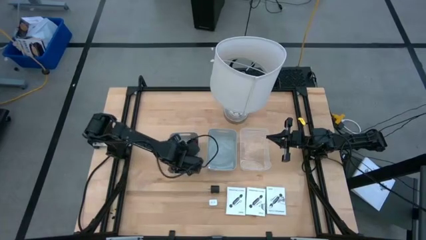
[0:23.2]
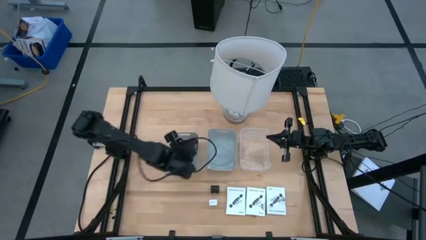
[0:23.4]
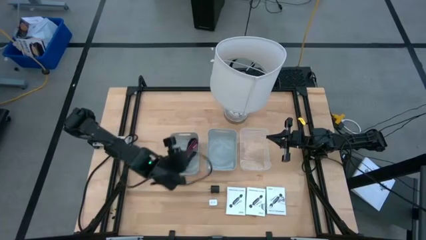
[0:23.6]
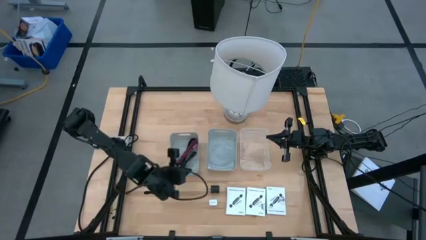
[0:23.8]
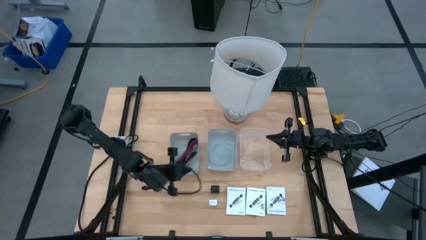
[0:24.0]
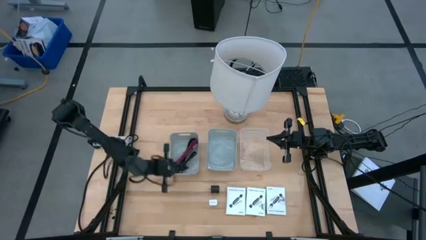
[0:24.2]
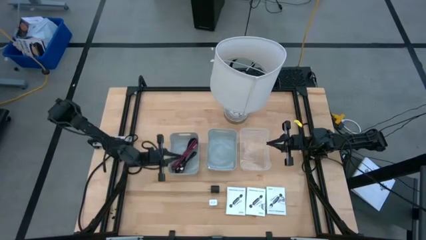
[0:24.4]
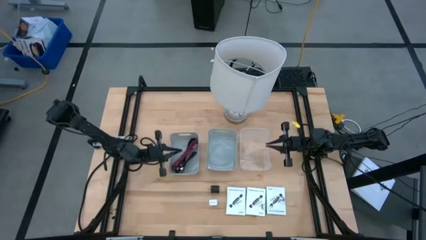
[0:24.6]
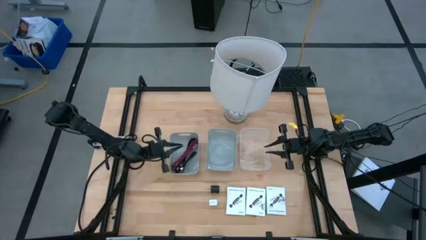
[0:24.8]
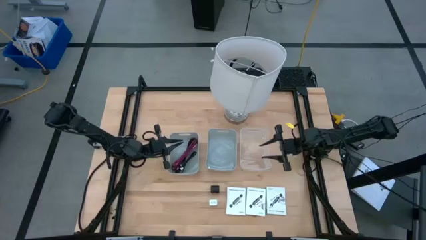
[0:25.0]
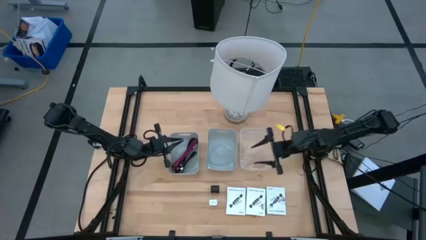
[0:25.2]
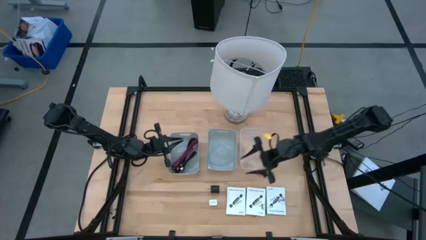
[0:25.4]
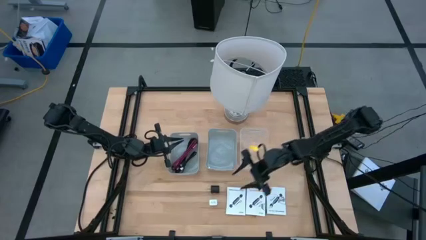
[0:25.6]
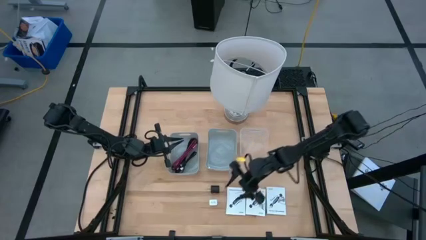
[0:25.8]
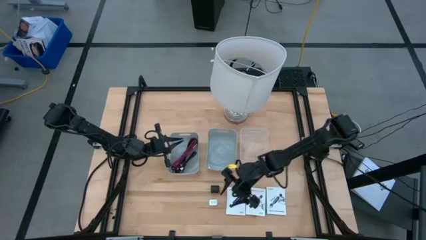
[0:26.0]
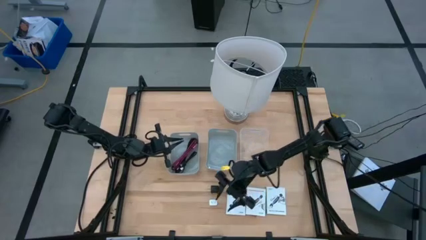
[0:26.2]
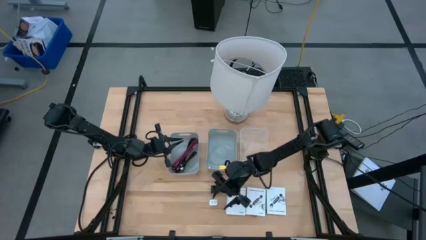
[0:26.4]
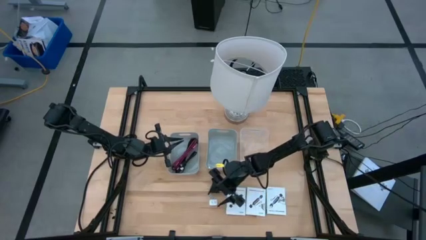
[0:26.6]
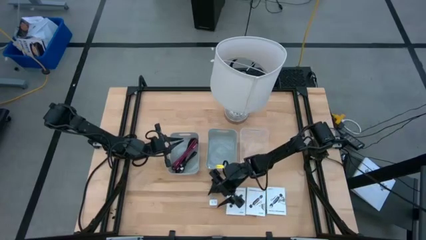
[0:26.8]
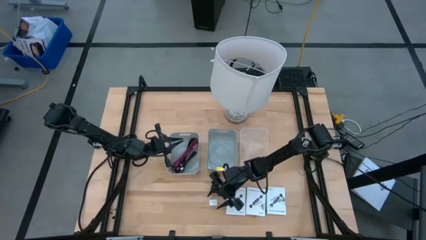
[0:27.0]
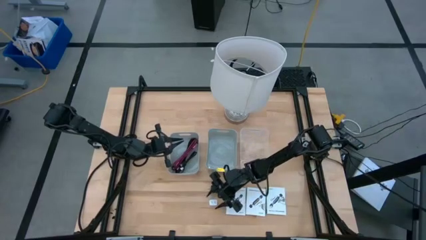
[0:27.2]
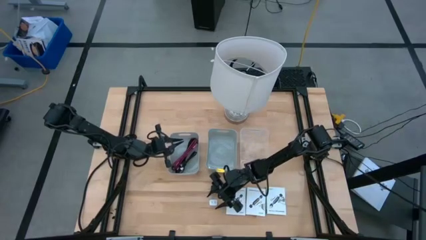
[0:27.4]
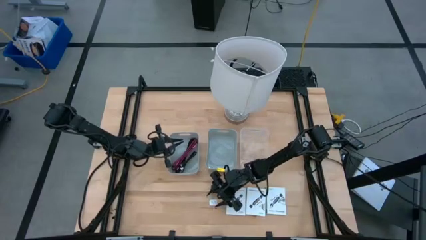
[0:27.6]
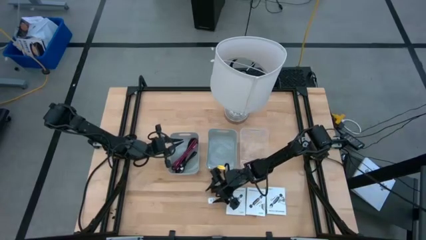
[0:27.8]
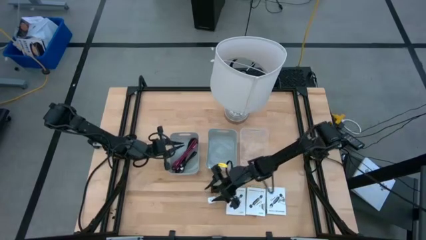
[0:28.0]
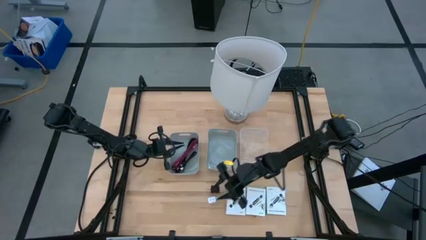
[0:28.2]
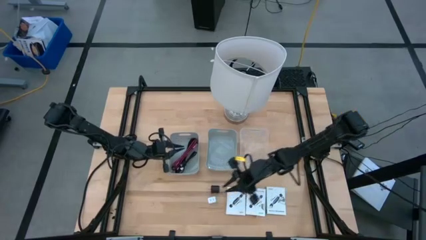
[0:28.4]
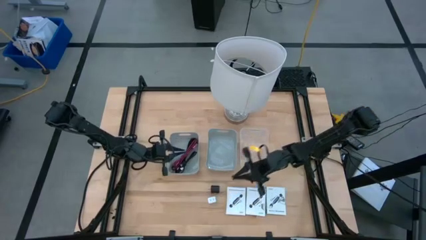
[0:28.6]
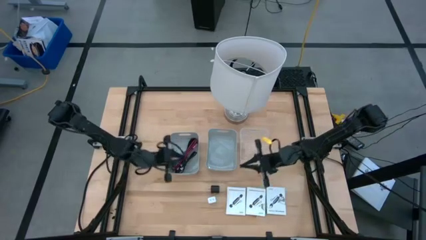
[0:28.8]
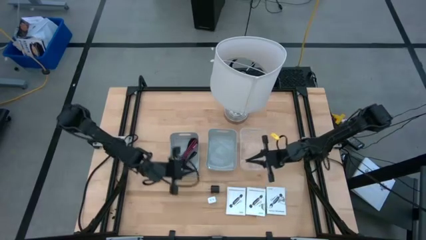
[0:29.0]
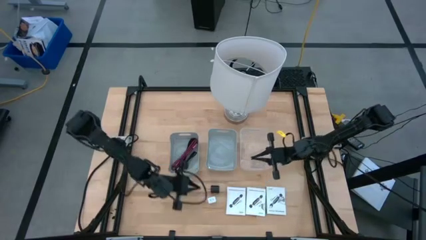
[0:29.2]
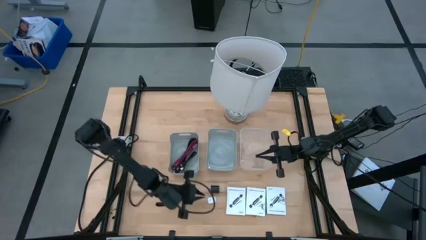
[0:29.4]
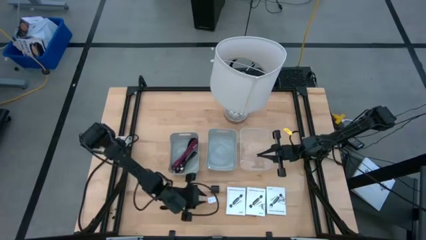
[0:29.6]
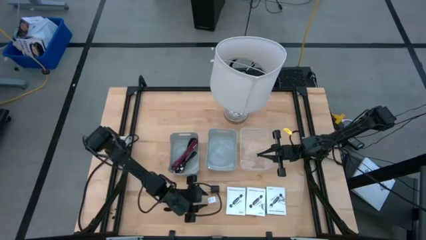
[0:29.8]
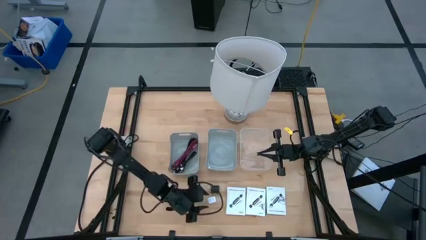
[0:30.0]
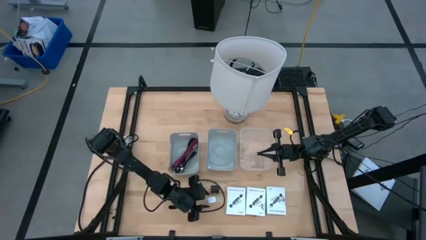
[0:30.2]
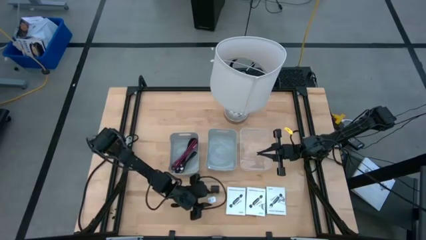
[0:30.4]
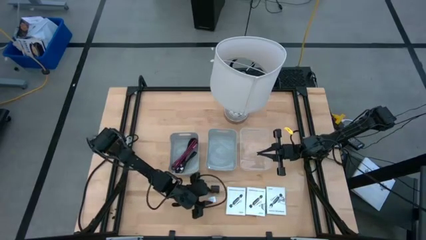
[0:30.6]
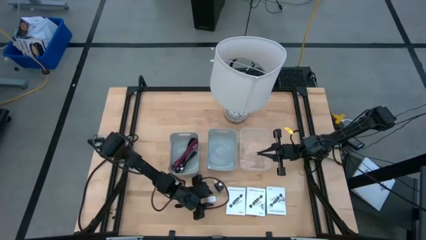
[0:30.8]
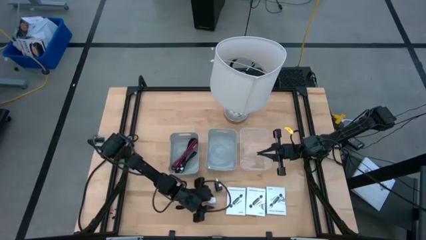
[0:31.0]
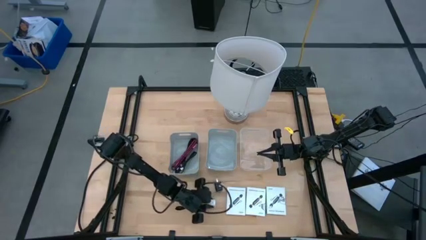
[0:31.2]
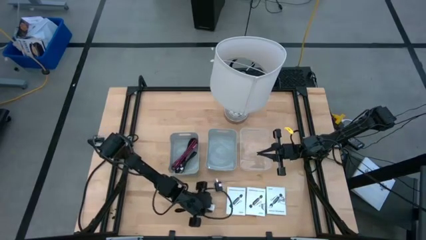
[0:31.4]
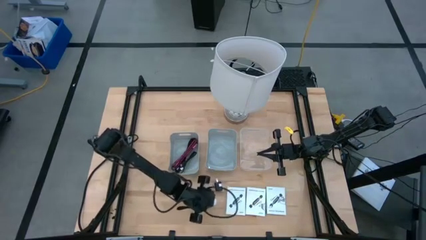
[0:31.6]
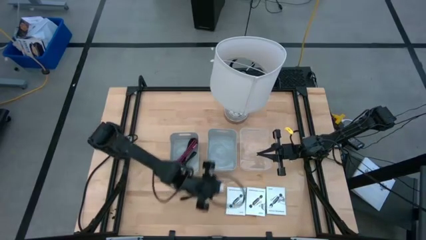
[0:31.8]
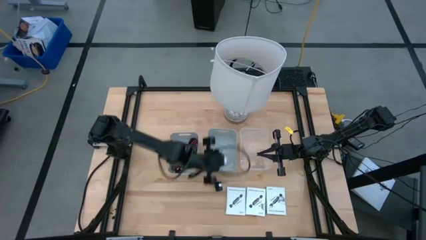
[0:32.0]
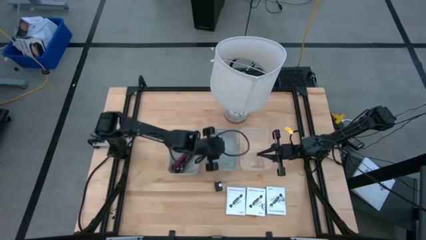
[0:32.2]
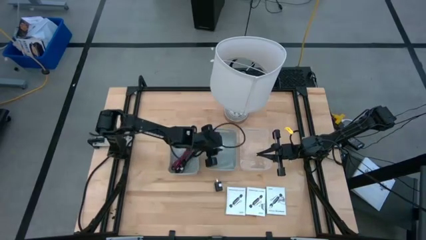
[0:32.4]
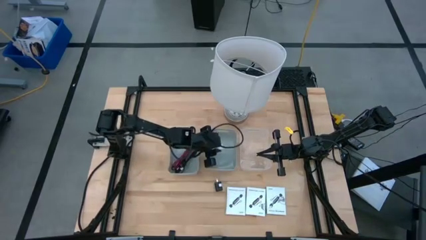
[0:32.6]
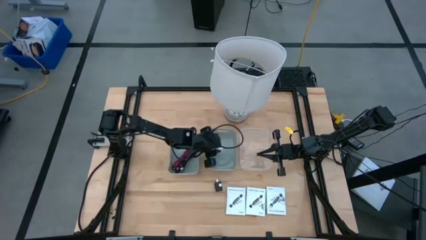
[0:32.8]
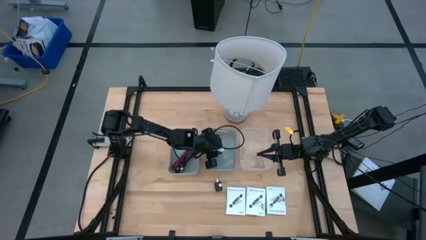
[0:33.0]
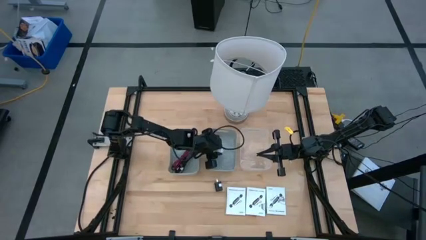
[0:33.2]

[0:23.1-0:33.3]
Task: Pick and place items into bin
Put the white charger adapter into the right gray bin

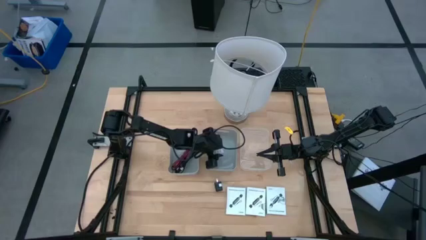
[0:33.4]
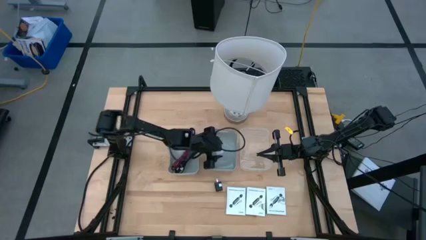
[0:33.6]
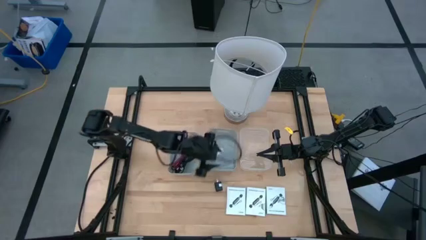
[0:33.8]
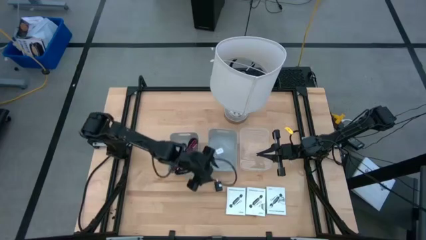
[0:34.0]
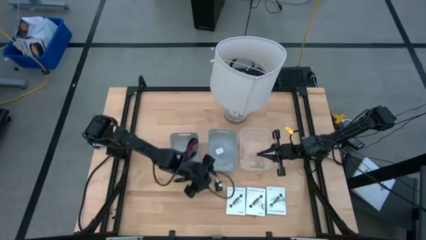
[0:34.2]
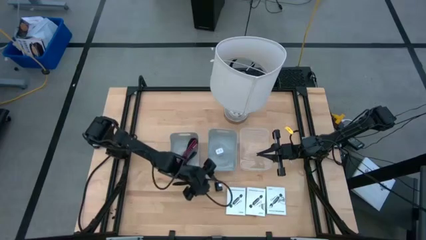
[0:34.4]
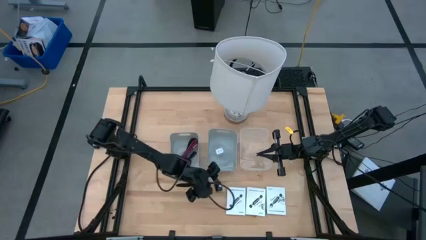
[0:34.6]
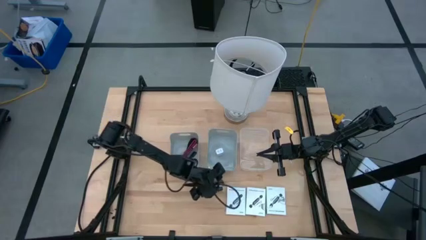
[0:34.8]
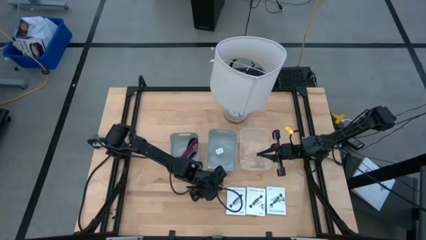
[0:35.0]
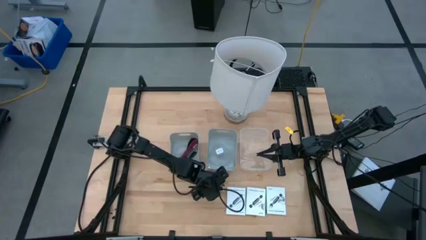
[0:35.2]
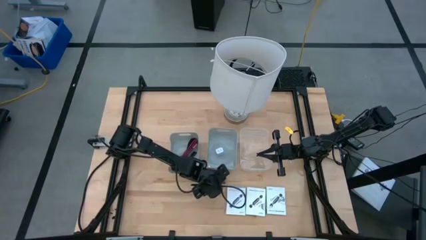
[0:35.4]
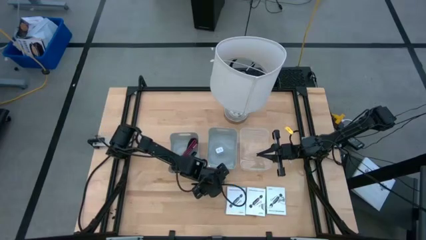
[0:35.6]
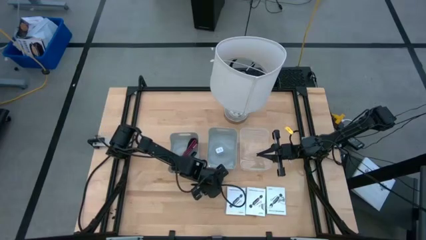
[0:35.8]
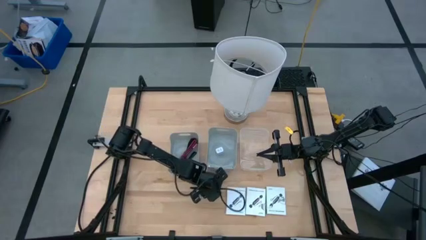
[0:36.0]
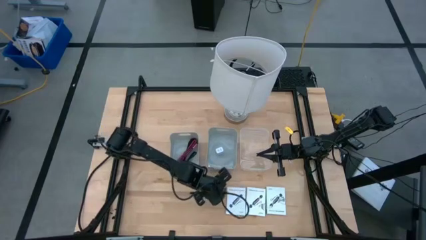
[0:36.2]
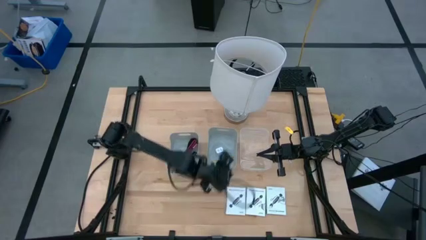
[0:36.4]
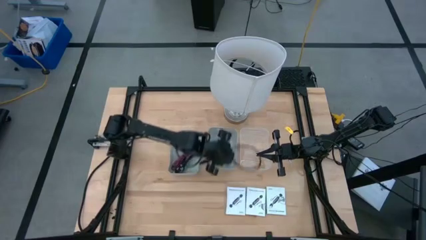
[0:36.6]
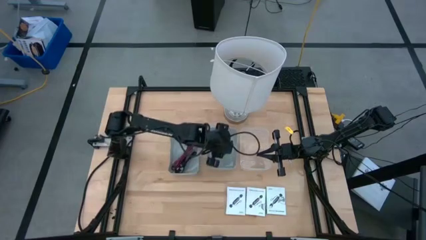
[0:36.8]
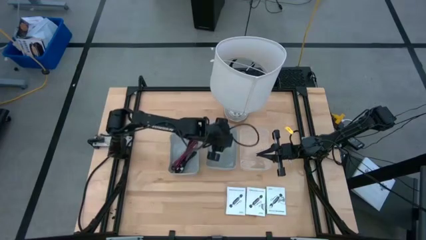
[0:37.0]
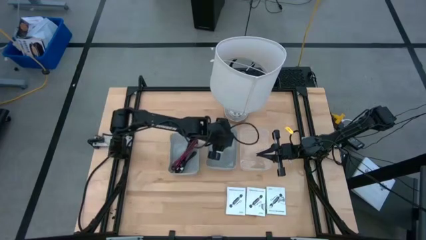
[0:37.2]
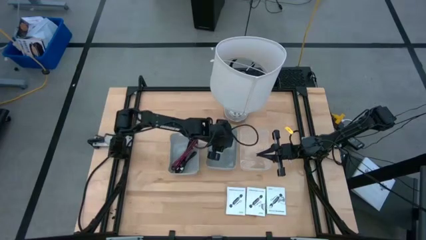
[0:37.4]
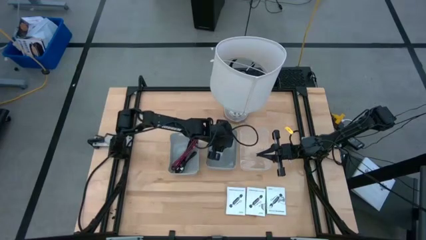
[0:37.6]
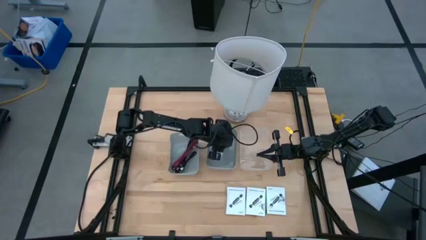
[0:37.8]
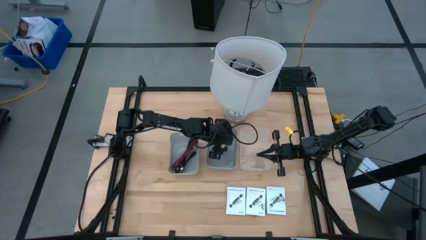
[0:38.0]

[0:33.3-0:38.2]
Put the black charger adapter into the right gray bin

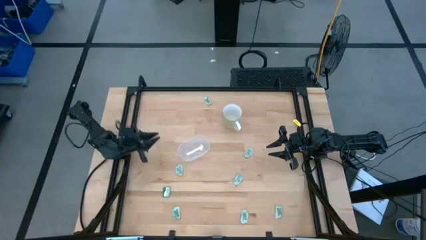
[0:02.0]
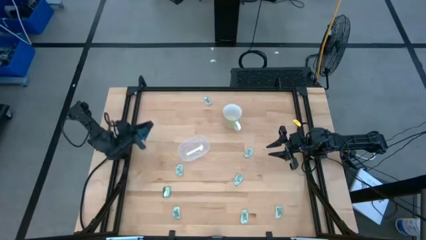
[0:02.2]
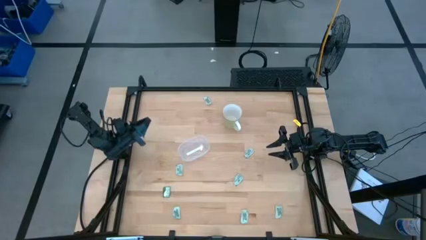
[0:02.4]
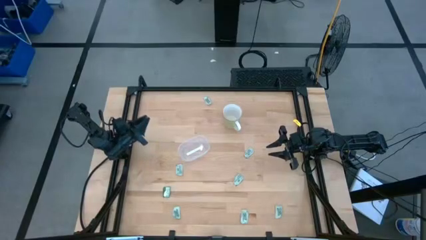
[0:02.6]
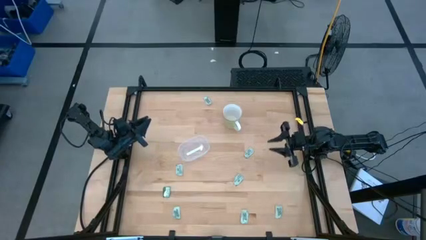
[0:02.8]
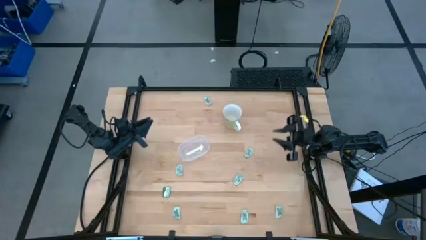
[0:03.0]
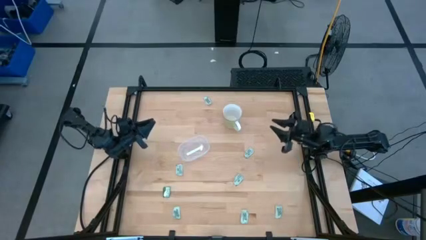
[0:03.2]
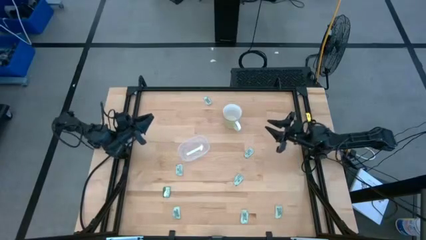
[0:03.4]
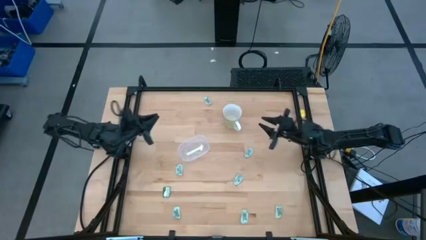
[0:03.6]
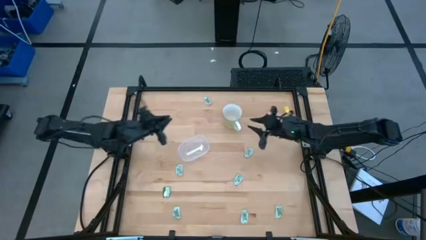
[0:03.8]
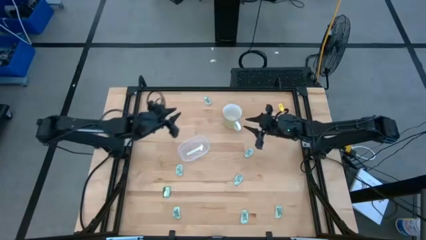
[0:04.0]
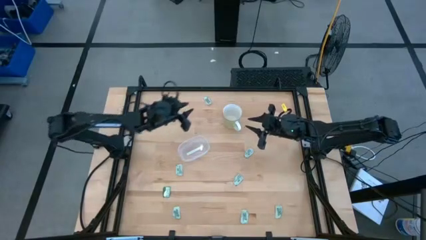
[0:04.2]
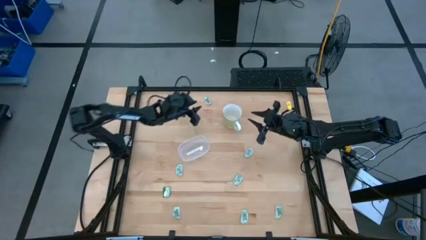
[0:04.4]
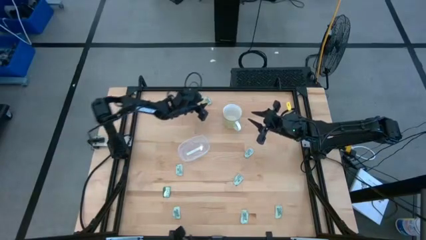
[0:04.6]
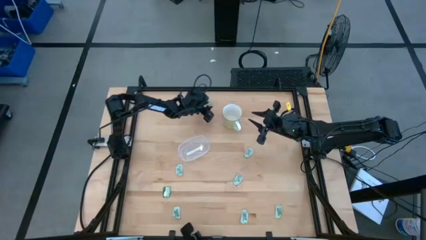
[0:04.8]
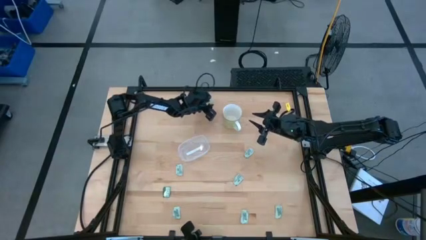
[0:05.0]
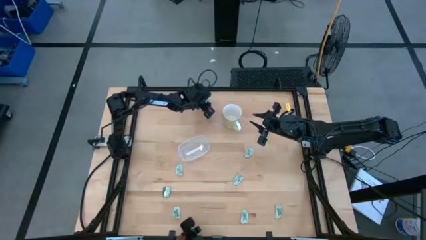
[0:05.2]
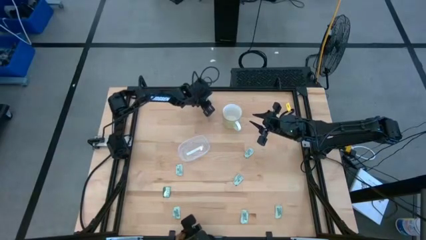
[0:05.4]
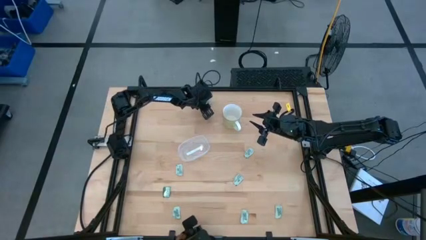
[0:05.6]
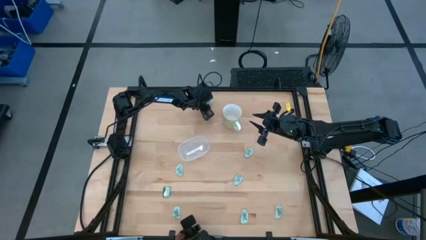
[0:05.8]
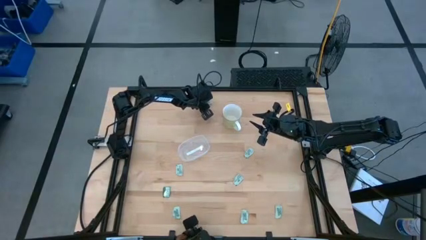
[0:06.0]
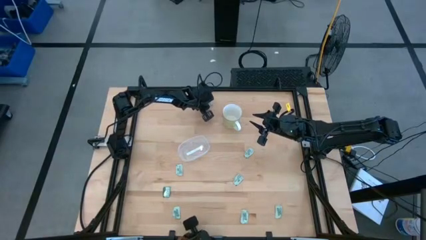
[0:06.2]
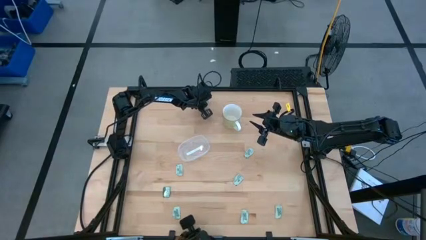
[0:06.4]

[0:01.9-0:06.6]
Task: Pick and place Stevia / Truvia into bins
Put the white stevia packet into the bin
